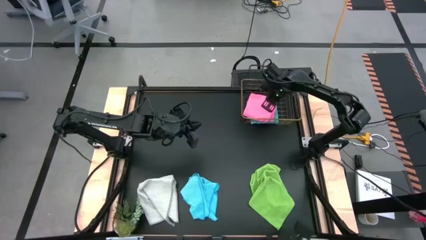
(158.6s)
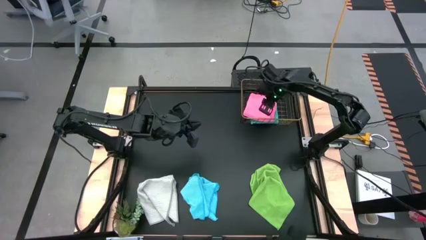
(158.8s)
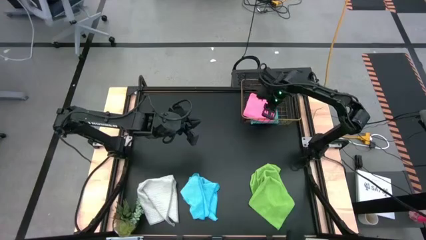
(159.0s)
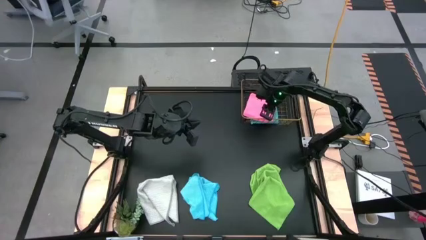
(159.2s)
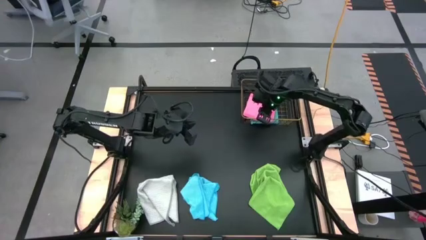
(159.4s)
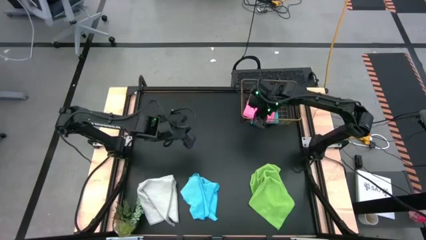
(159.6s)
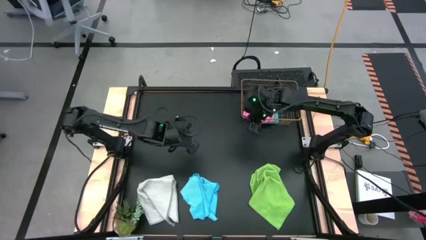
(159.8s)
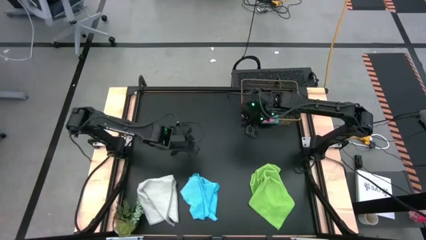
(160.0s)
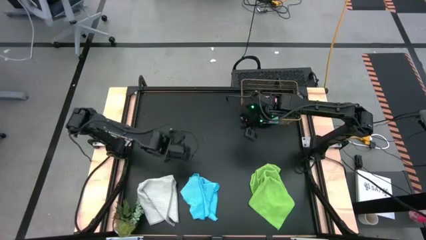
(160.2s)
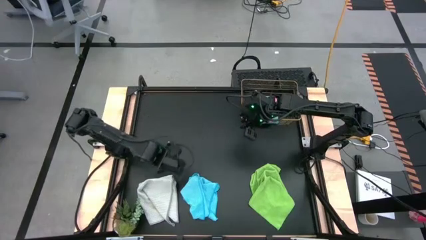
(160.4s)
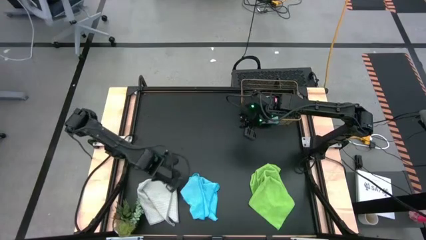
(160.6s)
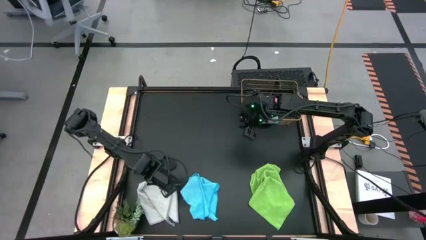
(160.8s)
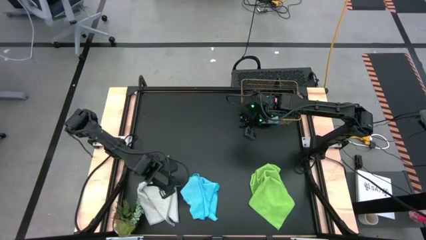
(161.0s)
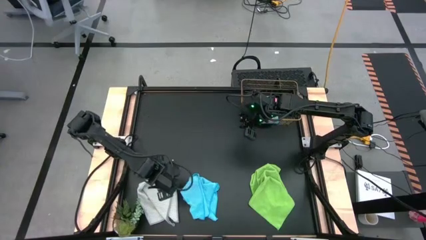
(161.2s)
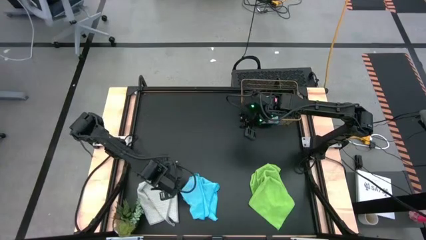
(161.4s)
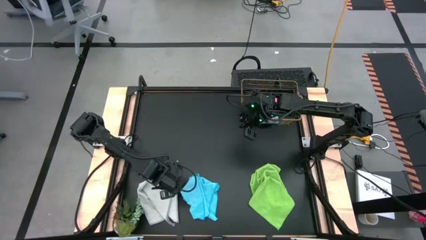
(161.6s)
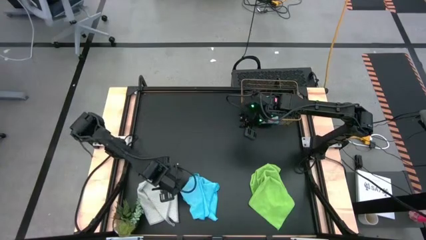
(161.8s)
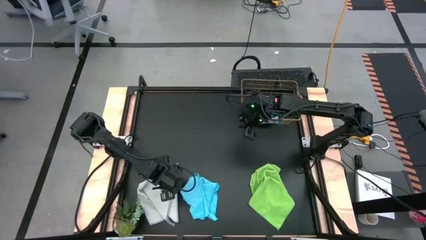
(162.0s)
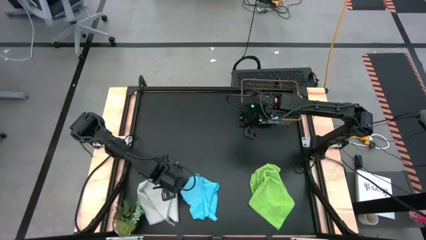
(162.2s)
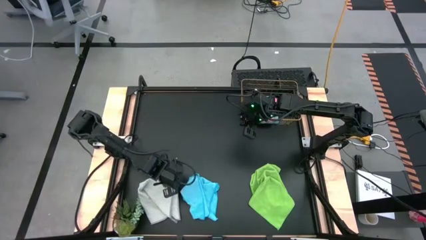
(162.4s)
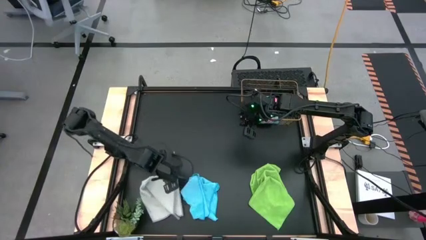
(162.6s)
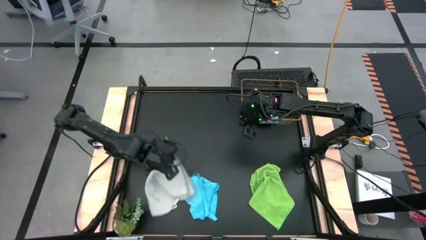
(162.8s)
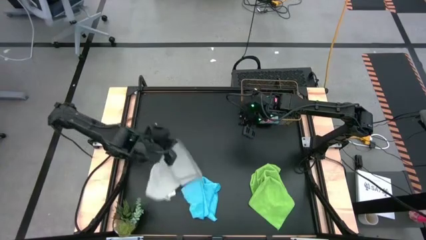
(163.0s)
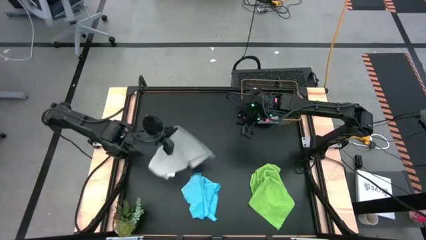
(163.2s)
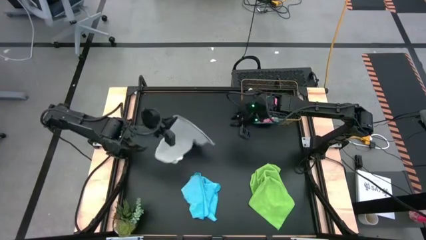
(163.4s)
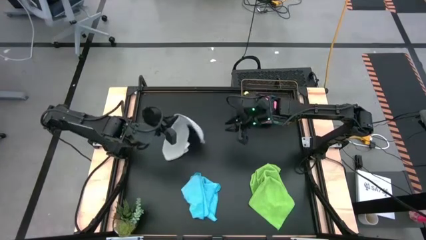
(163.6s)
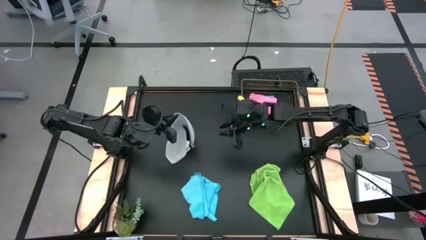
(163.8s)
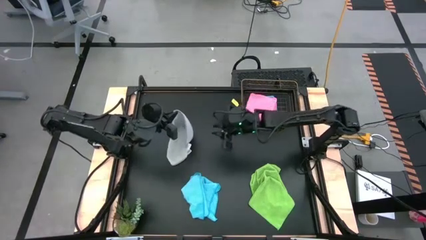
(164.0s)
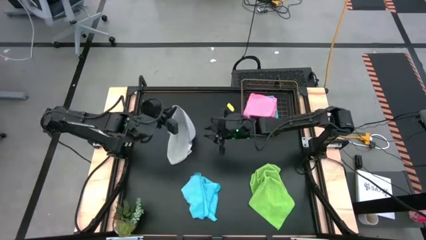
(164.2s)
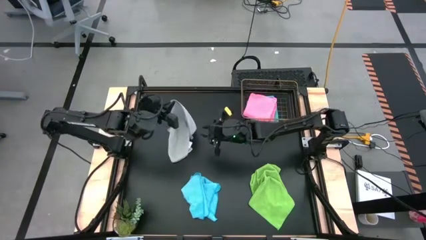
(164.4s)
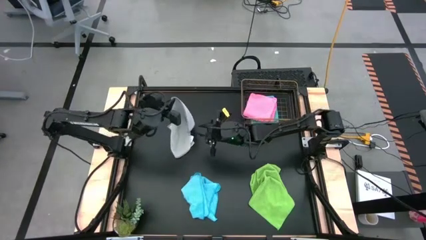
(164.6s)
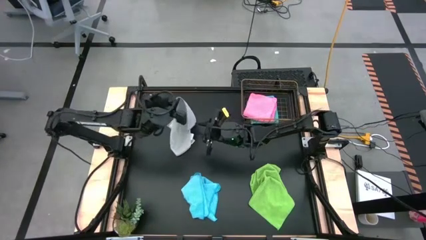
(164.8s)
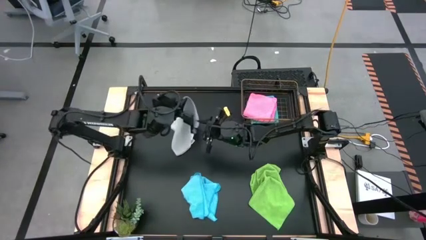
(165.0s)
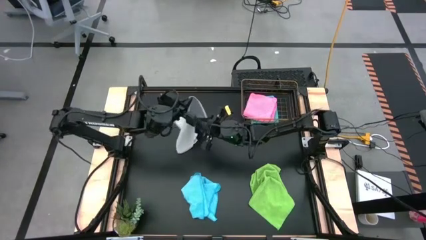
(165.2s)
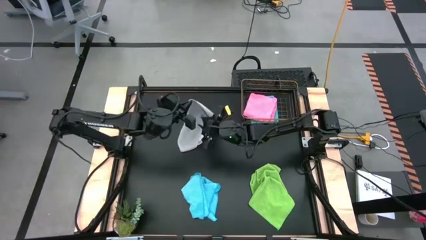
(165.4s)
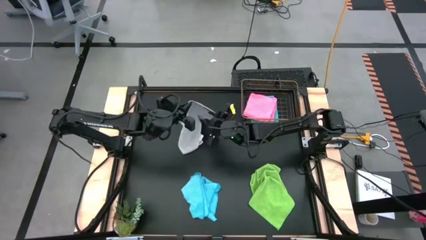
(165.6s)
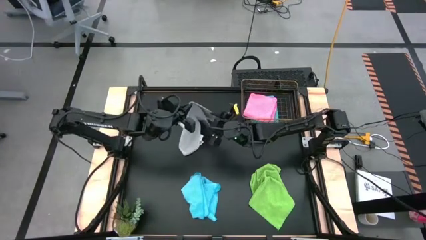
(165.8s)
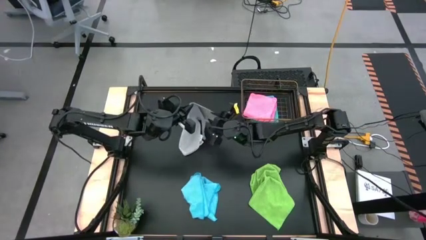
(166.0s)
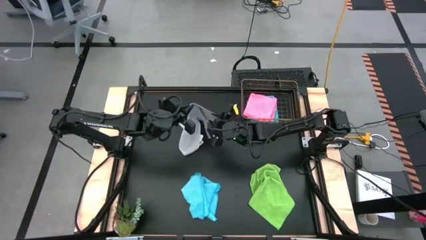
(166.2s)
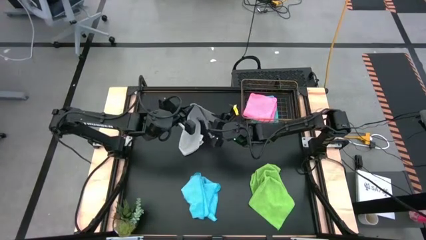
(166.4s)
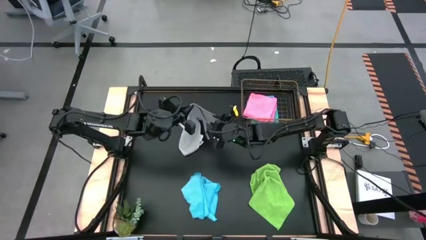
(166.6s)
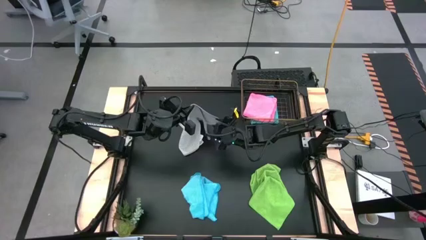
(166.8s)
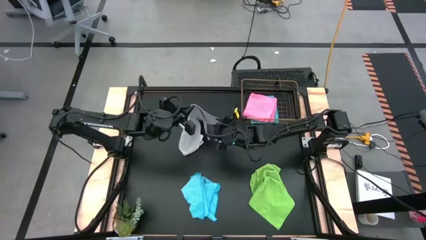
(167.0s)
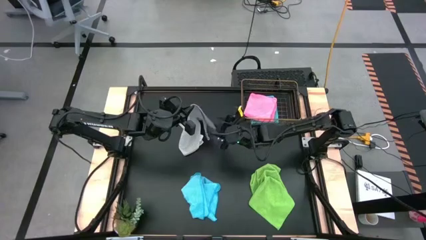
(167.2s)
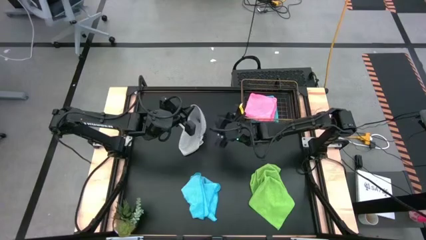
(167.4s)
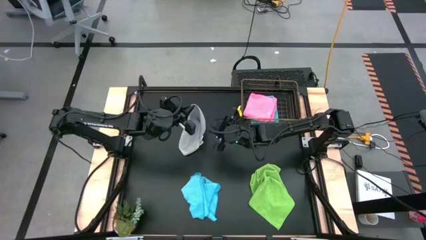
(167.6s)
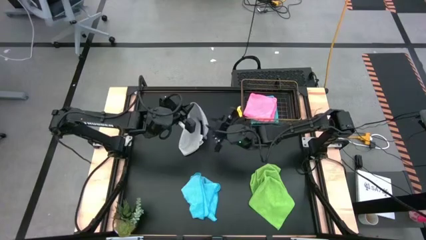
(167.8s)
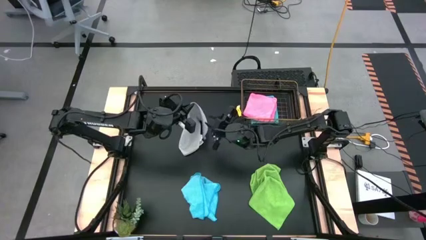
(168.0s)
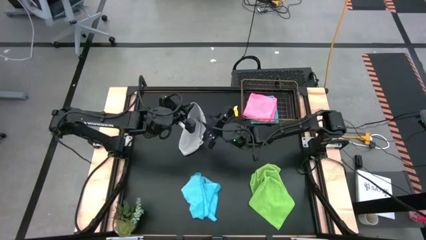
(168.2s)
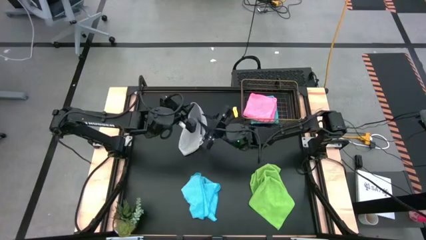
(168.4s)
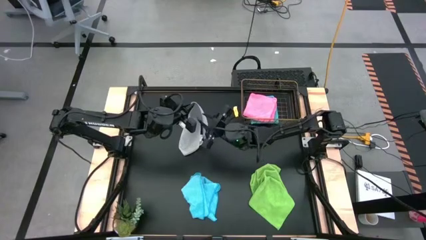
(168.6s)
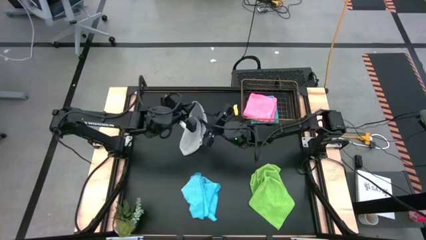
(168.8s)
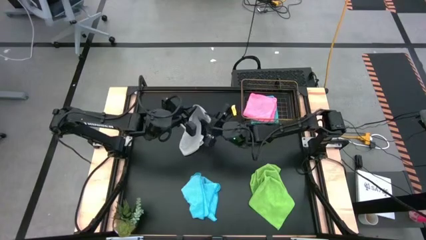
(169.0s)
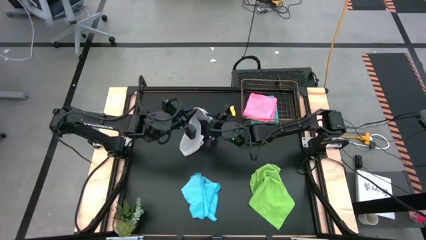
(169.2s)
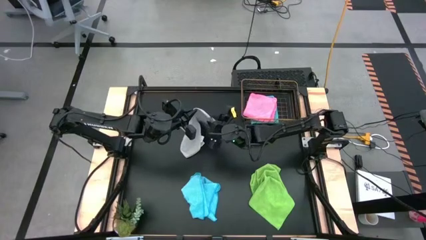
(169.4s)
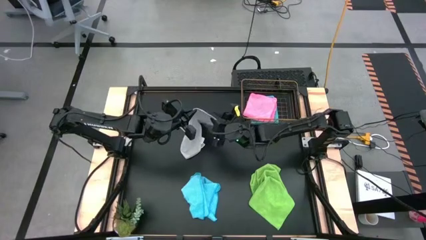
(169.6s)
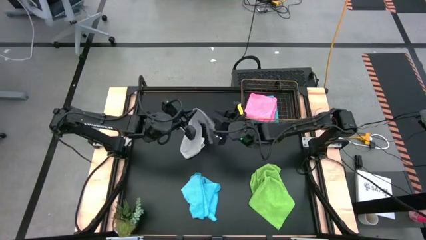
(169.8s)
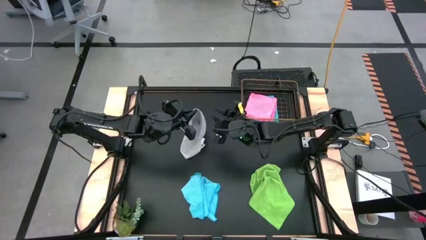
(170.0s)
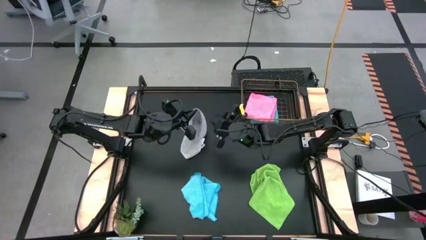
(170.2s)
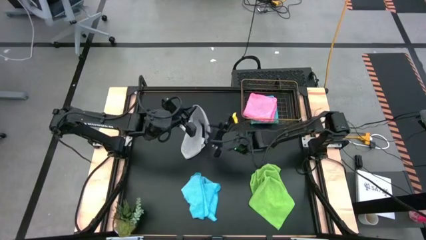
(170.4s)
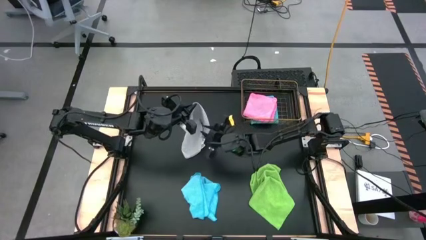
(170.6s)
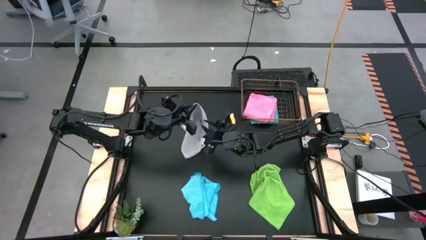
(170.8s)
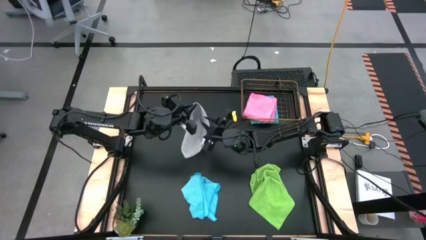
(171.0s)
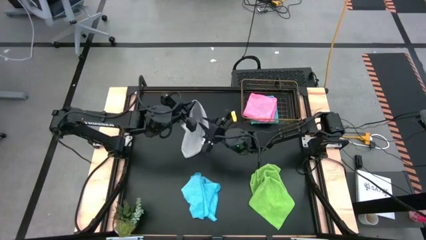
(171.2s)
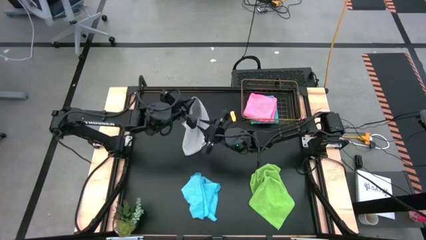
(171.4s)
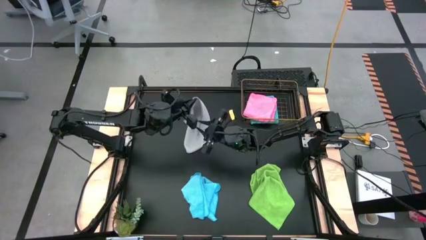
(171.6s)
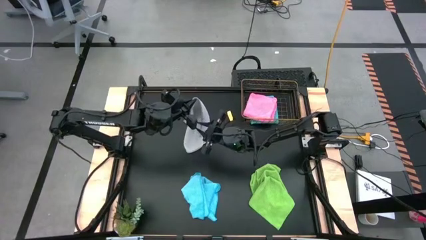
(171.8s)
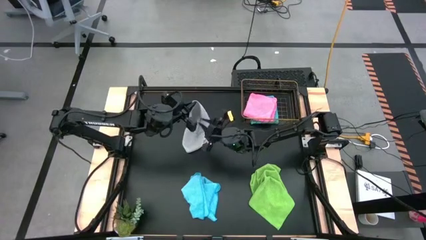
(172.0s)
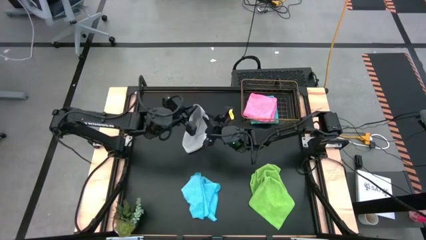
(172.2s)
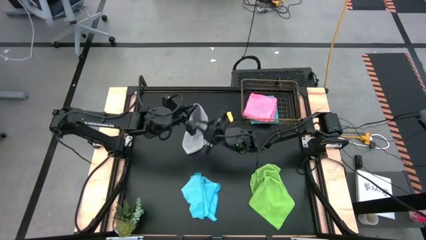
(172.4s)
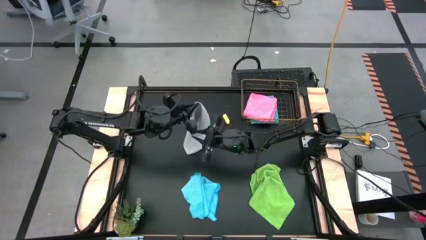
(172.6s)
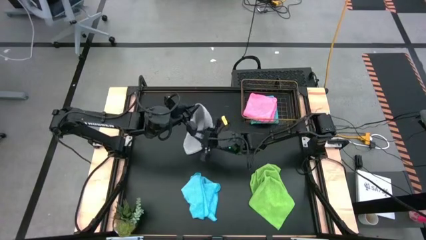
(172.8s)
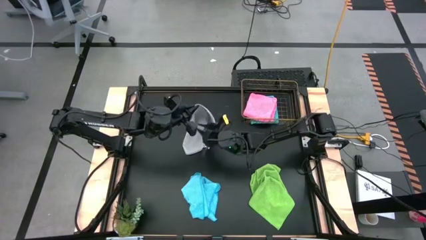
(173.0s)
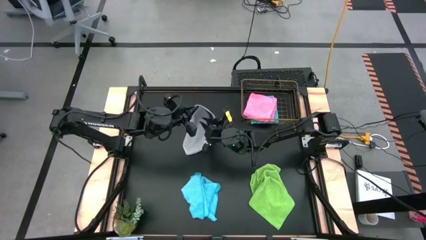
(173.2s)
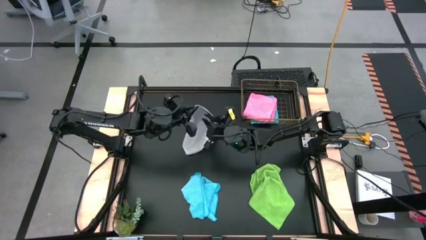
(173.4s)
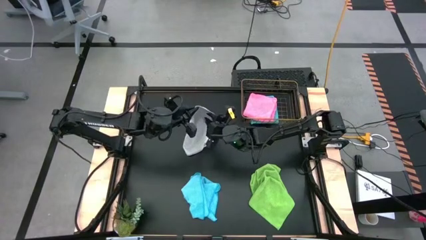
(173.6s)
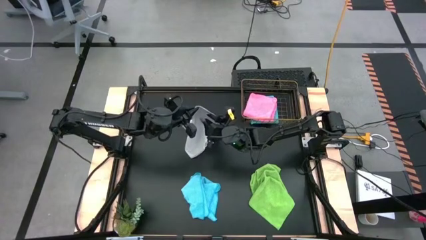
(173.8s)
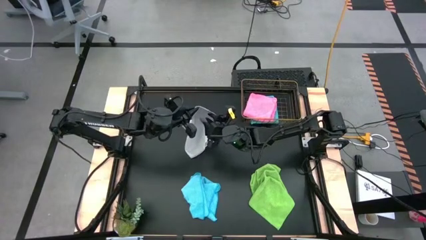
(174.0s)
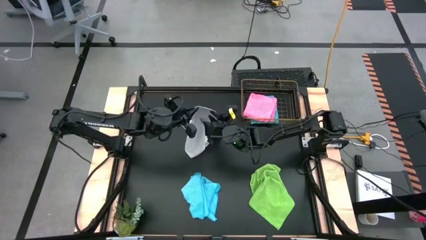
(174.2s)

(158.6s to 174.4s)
Task: Fold microfiber towels
Fold the gray towel

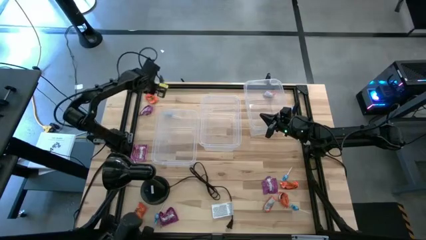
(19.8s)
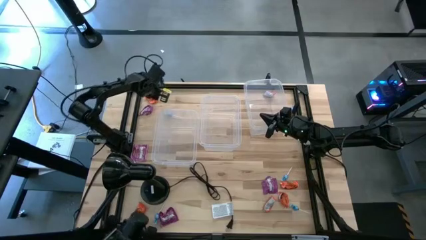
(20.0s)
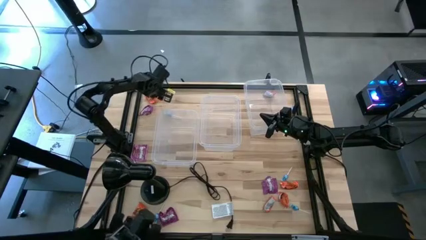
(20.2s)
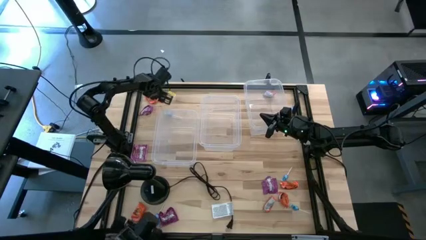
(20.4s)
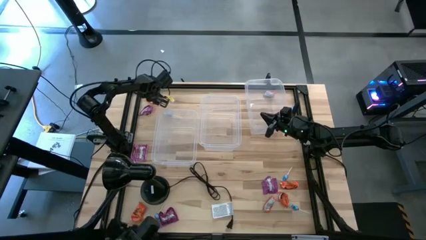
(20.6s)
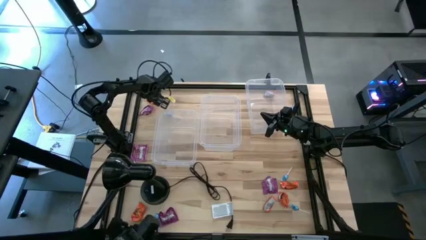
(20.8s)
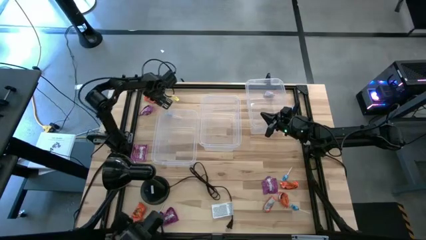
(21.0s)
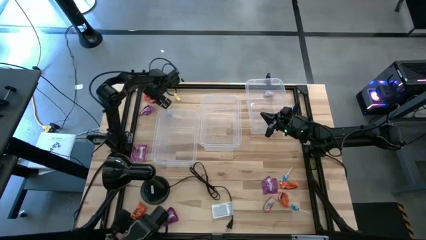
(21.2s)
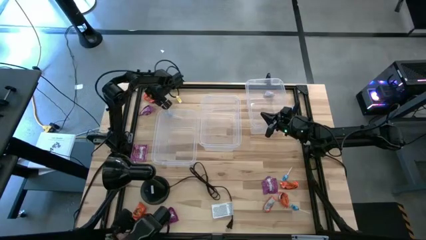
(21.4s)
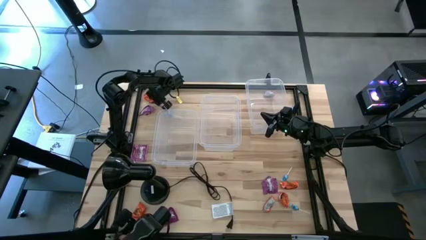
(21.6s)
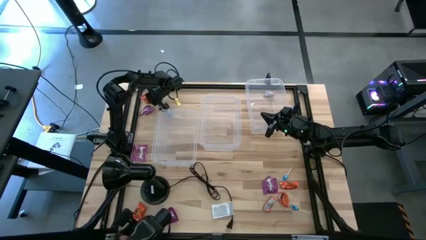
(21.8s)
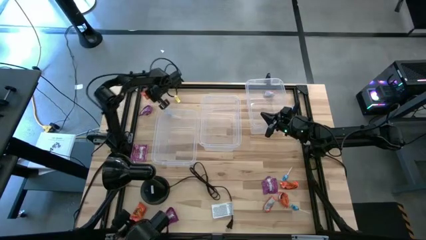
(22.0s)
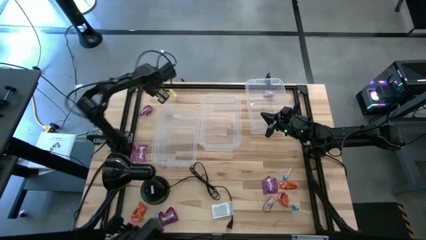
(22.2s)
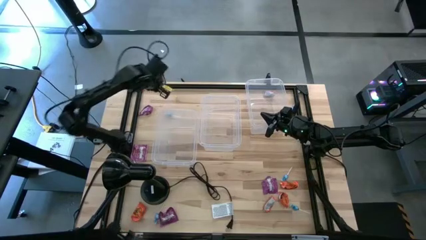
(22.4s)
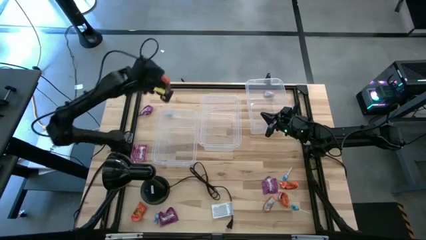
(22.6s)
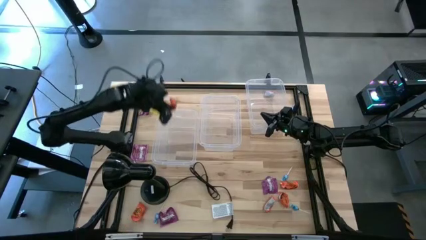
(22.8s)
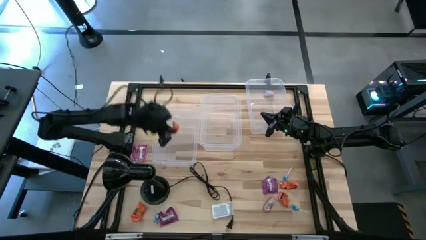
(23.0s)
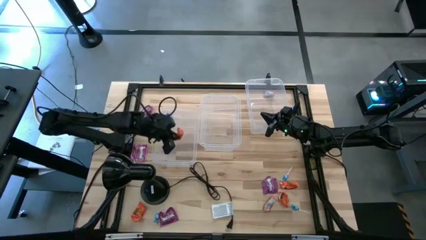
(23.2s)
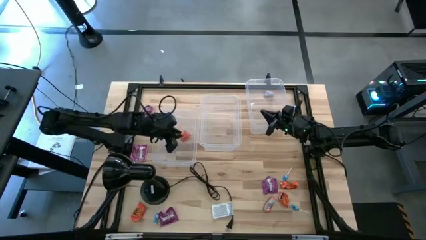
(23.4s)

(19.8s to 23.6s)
Task: Sort candy
Put the orange candy into the left transparent bin
